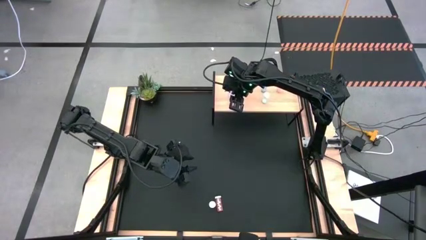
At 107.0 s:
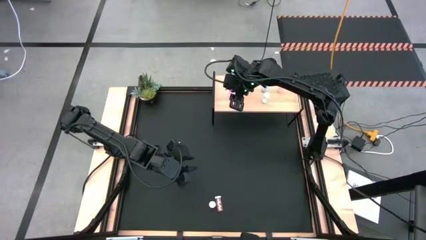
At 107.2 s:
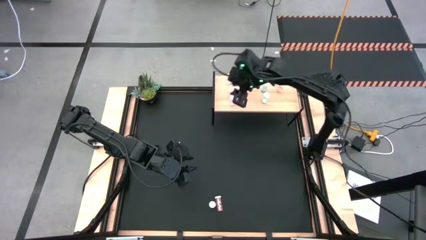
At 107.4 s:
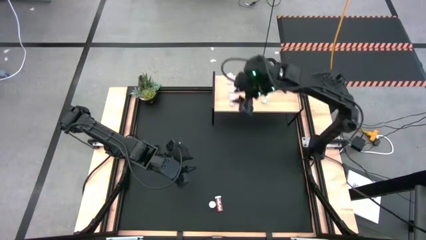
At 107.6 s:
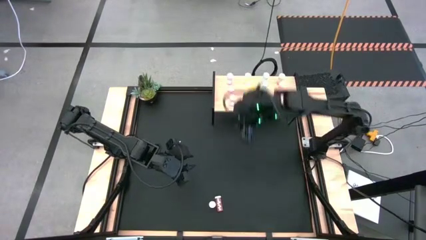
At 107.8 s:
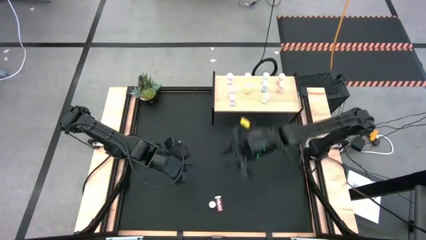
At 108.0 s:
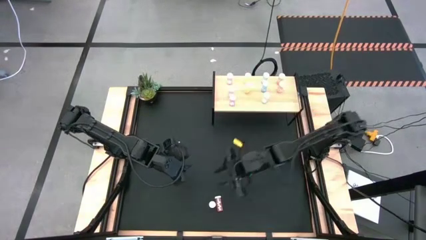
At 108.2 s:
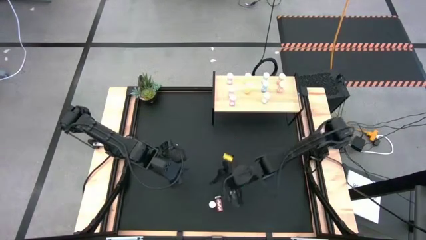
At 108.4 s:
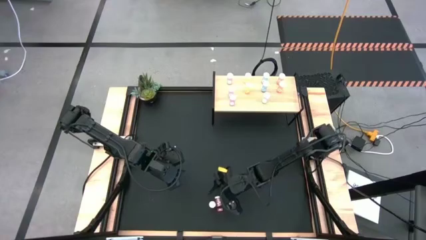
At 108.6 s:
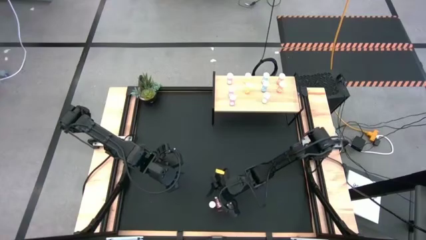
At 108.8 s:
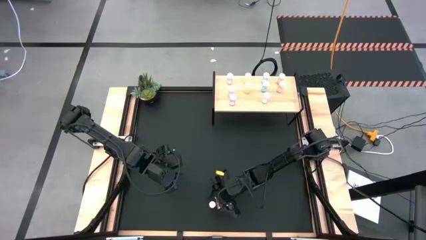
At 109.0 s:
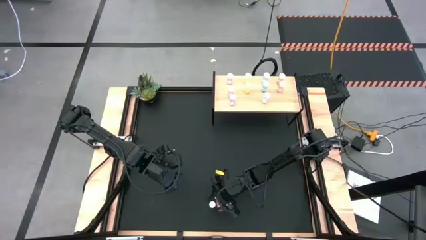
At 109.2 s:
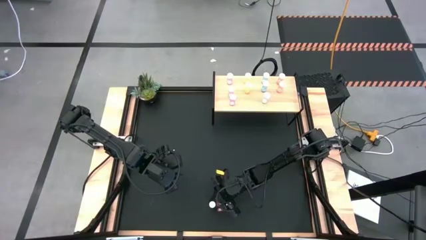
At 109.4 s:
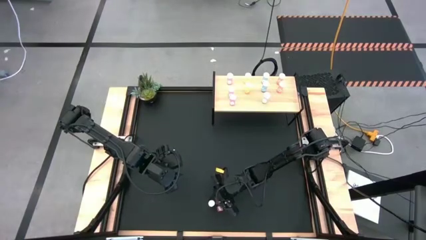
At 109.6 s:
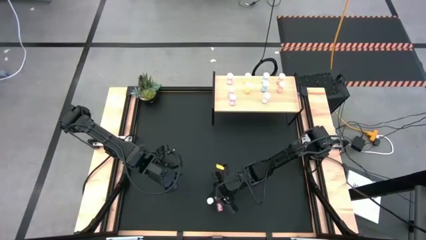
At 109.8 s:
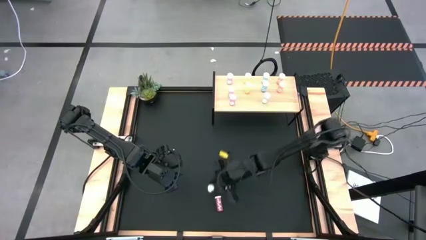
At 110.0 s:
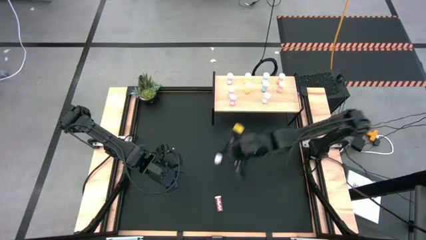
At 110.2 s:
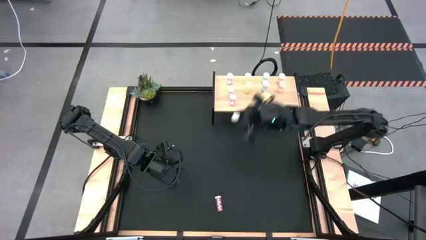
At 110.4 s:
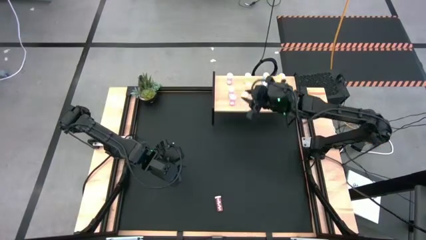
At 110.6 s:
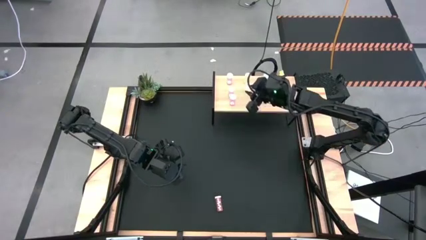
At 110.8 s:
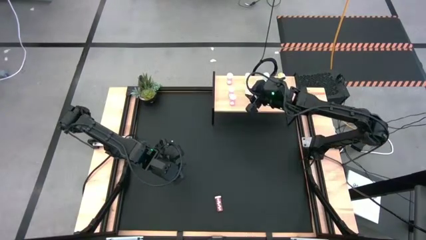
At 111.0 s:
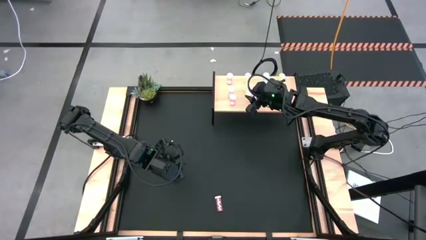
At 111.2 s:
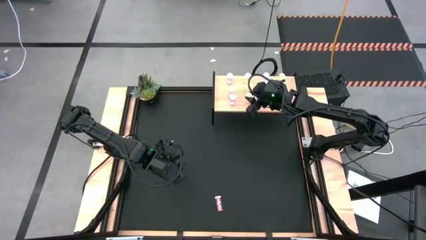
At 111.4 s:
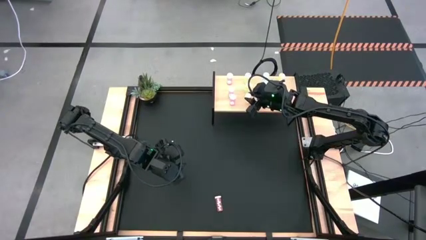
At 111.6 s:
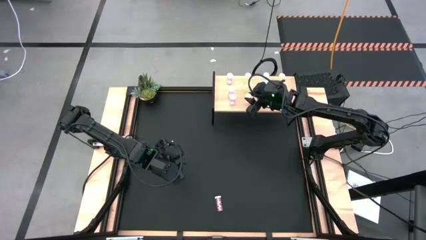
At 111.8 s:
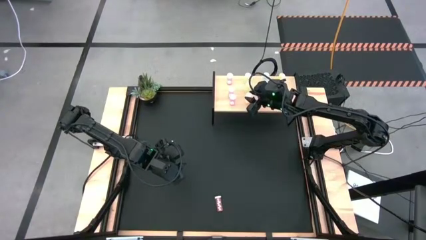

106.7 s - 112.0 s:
Task: Pick and place medicine bottles onto shelf by color
Put the yellow pill bottle on the shelf aligned with the other yellow pill bottle

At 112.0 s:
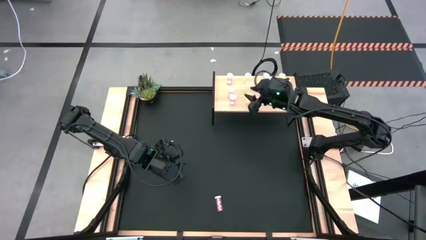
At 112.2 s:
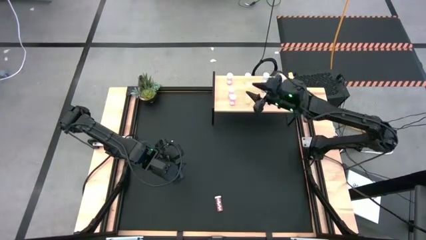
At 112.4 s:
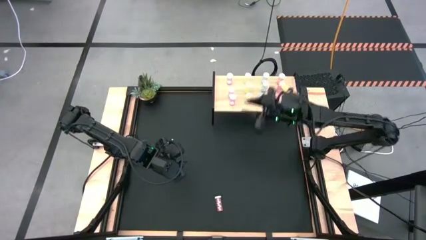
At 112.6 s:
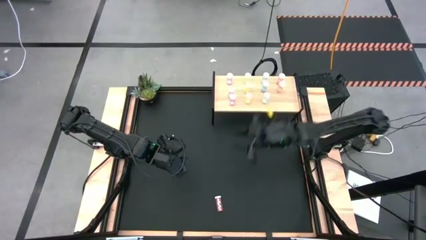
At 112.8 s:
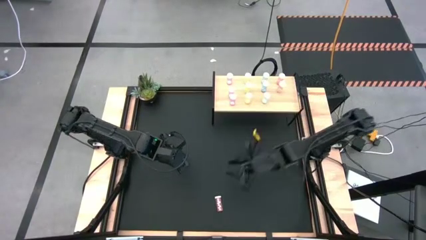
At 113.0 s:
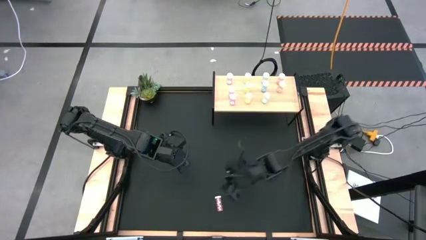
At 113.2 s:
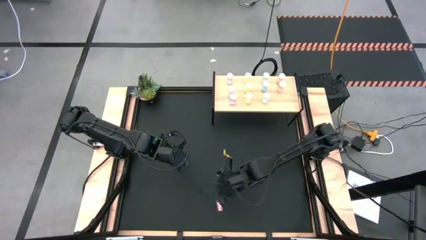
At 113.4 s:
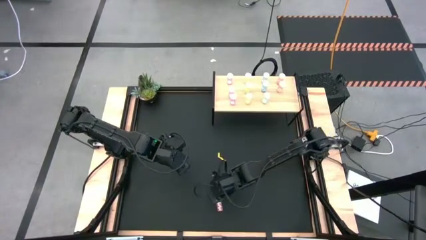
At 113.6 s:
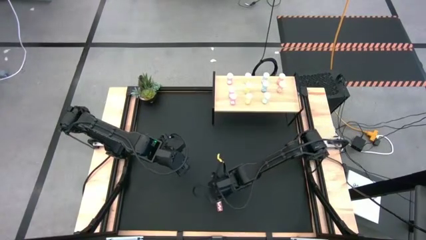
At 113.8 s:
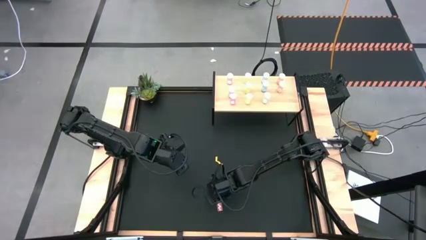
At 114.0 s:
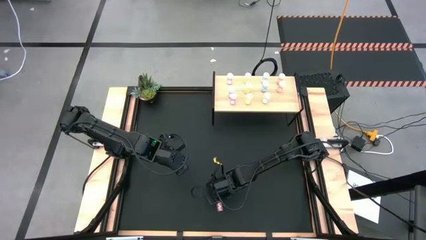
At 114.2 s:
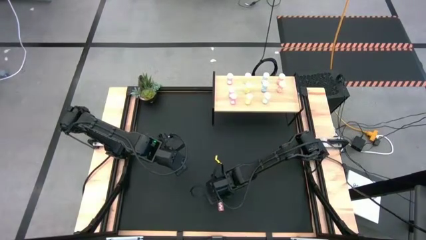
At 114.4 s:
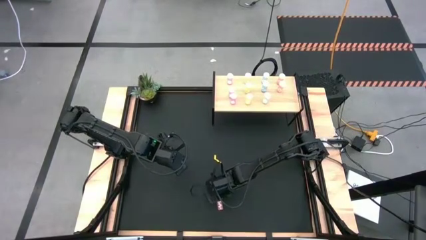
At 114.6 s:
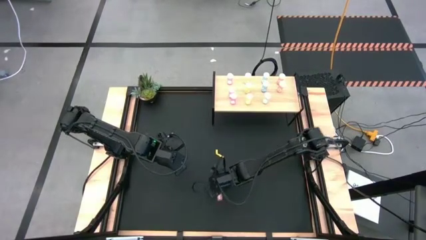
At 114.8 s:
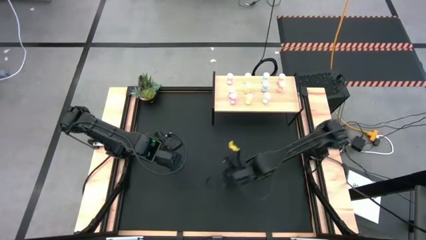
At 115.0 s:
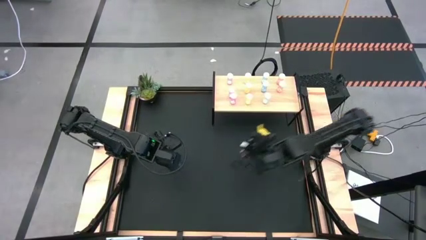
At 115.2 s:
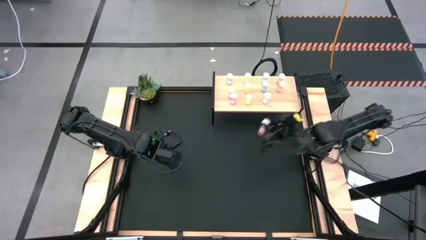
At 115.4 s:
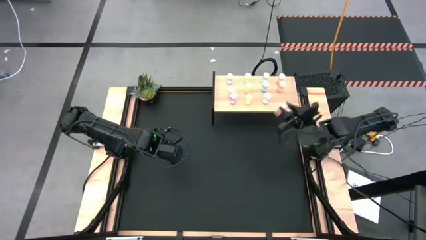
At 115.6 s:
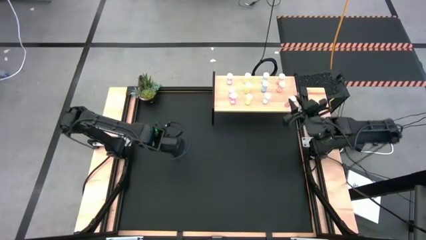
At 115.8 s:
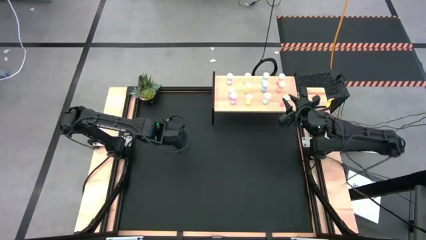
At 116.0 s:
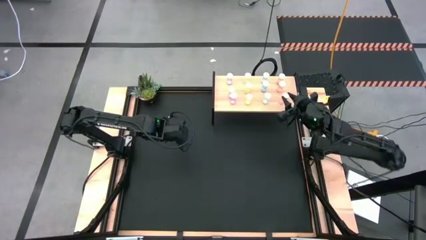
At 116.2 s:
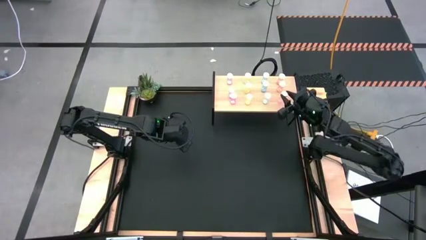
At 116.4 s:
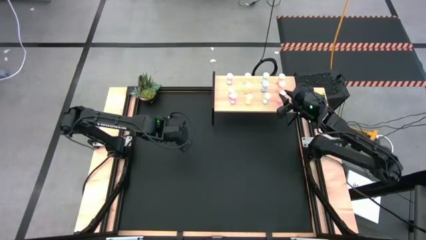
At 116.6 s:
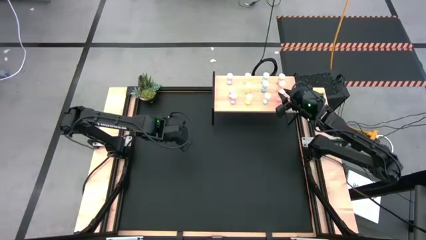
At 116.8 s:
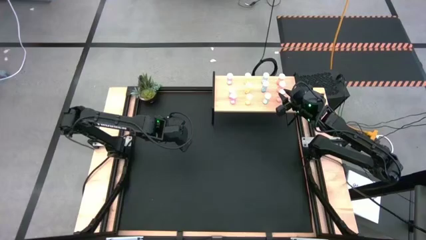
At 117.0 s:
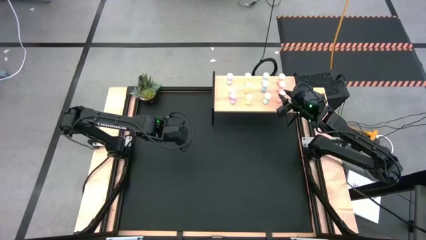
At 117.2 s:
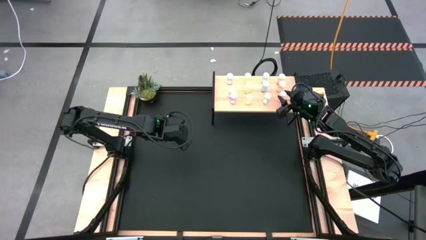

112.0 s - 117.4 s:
Put the pink pill bottle on the shelf aligned with the other pink pill bottle

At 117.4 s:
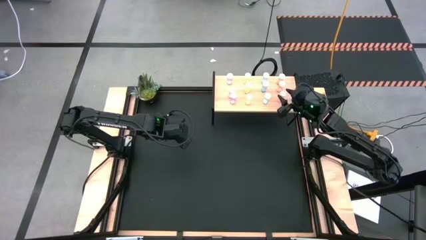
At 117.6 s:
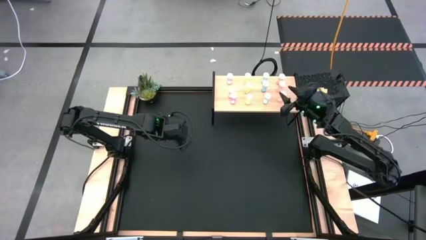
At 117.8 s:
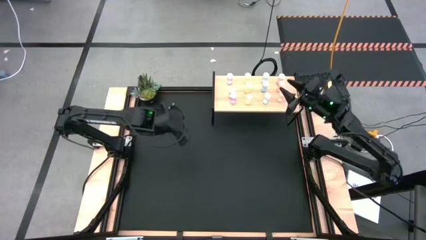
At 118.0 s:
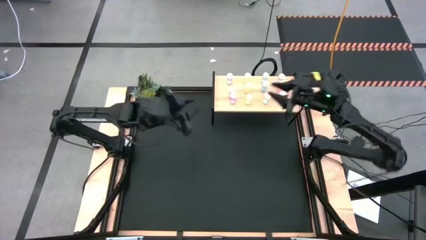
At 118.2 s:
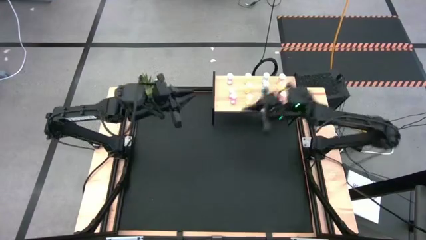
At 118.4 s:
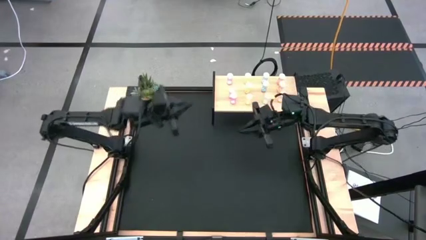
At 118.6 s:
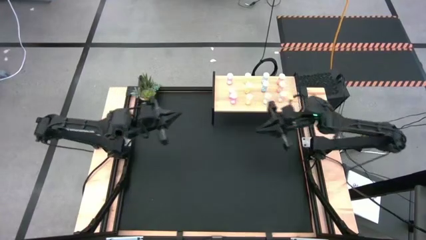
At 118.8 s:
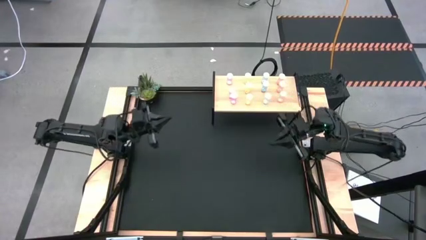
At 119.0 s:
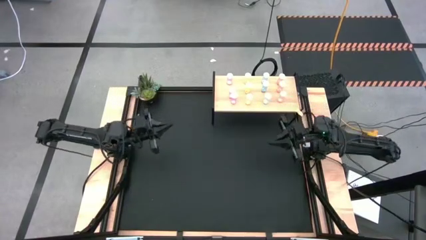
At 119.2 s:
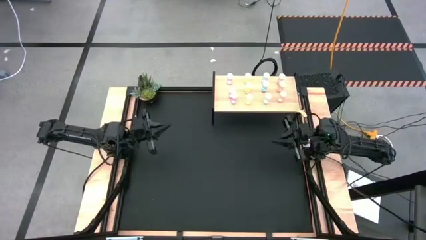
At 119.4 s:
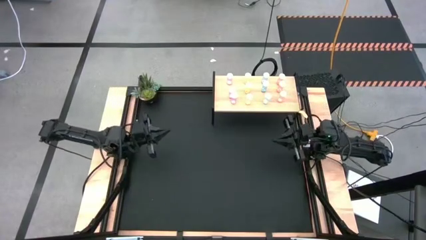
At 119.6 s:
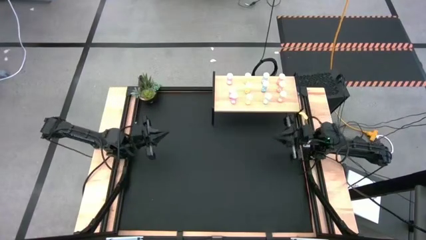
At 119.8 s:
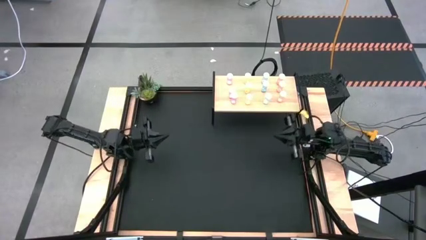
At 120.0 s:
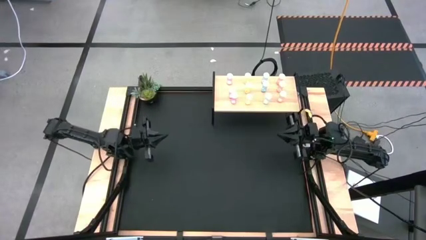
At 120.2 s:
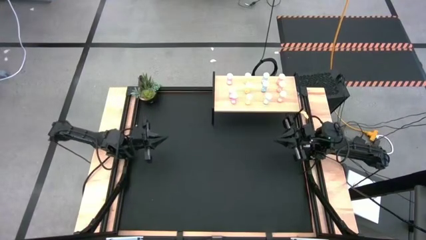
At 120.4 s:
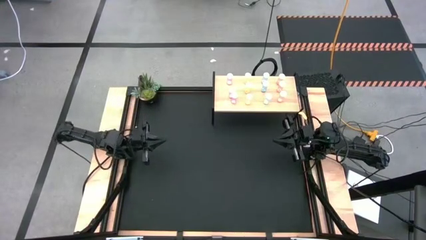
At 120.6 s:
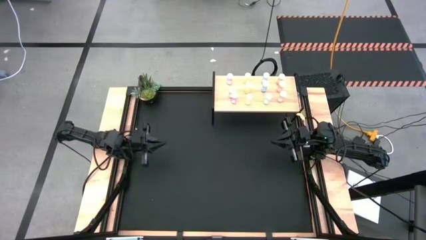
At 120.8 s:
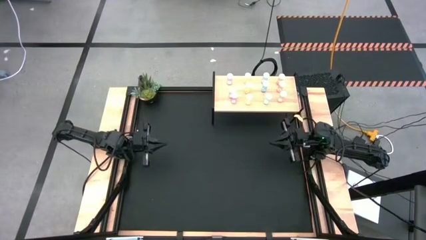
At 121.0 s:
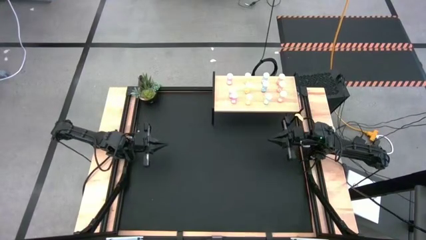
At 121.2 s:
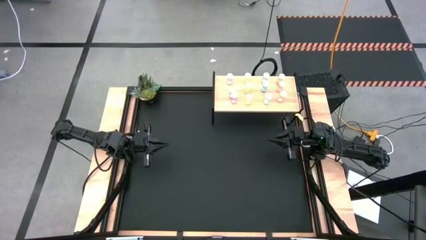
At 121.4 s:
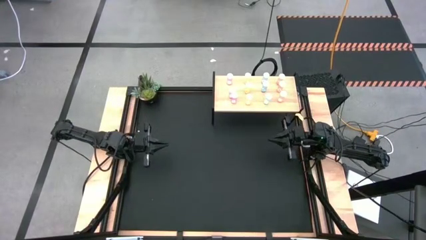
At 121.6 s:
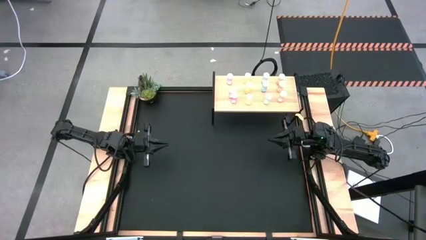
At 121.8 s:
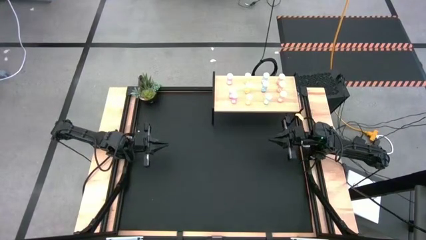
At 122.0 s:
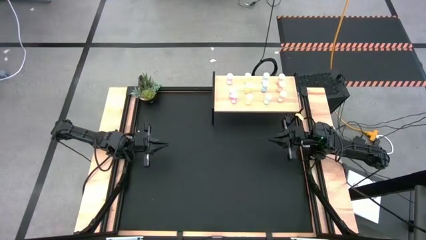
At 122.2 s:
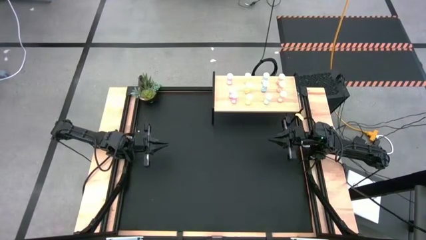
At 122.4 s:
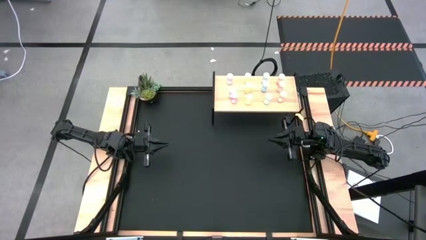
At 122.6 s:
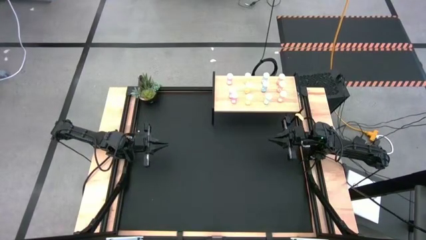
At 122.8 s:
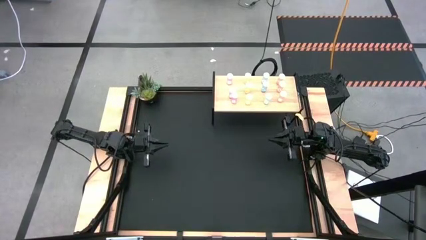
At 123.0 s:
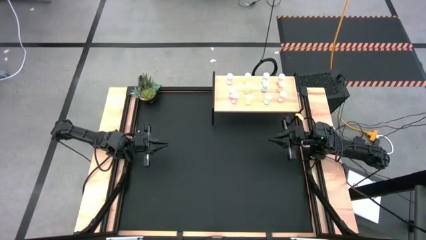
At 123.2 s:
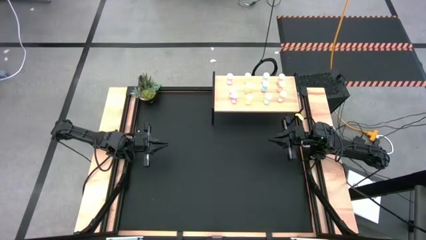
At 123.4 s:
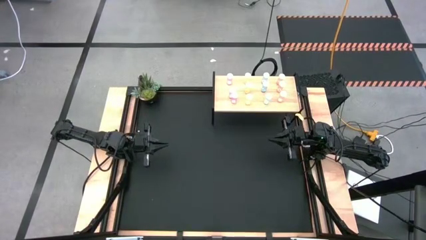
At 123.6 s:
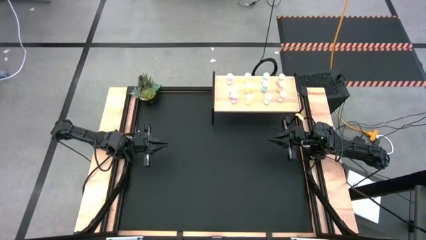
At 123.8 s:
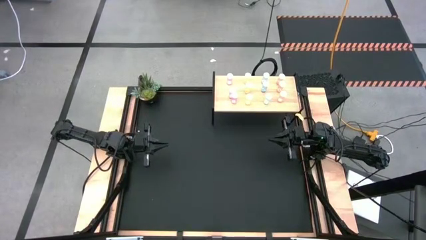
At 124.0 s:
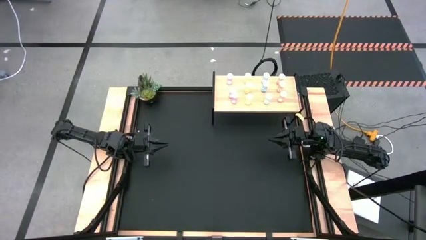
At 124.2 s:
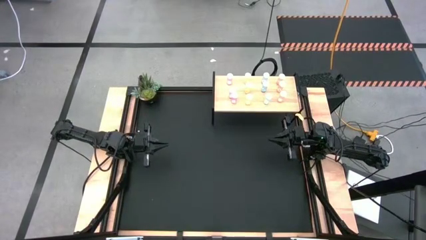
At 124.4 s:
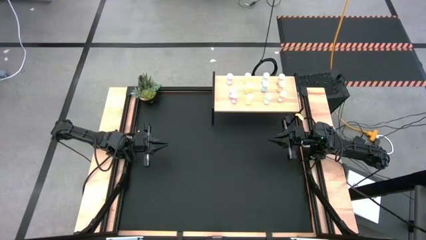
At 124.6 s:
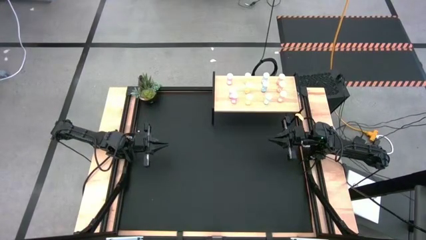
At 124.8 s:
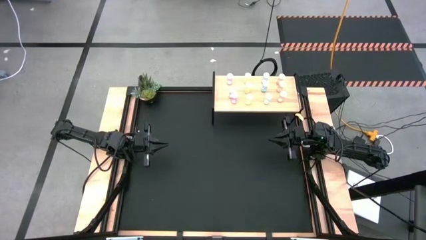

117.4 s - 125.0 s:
Return to Home Position
